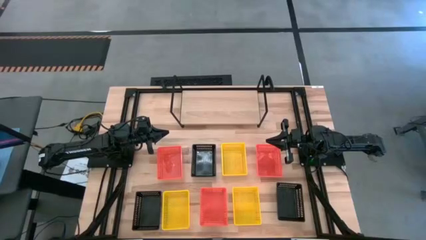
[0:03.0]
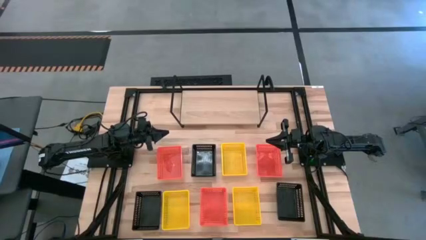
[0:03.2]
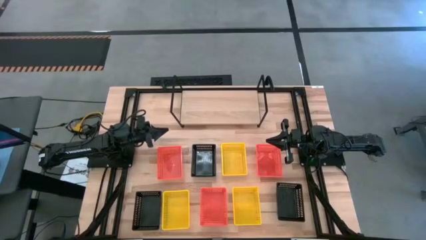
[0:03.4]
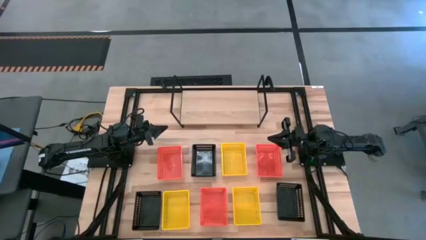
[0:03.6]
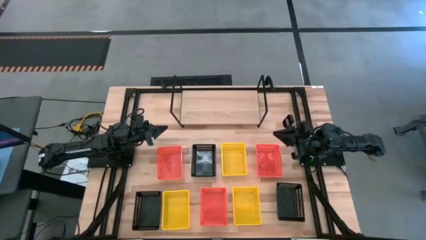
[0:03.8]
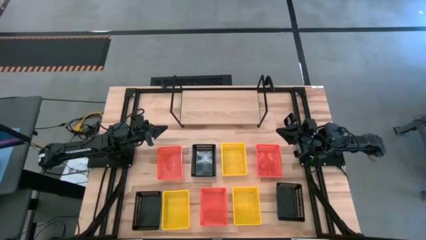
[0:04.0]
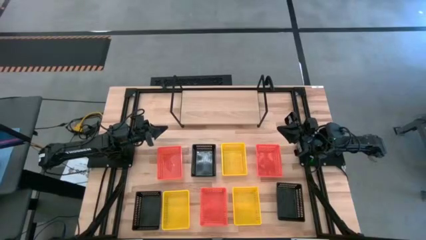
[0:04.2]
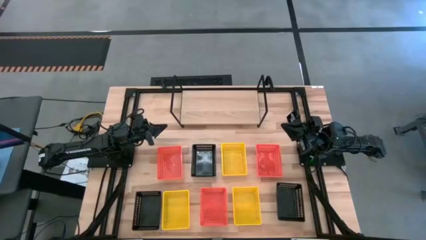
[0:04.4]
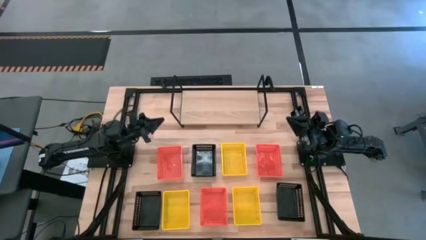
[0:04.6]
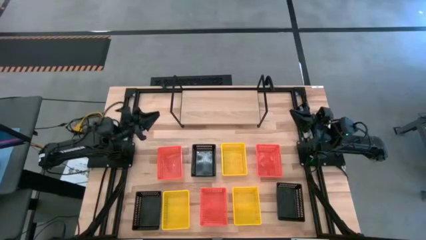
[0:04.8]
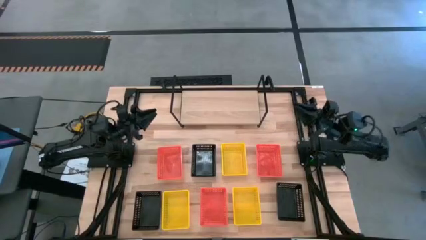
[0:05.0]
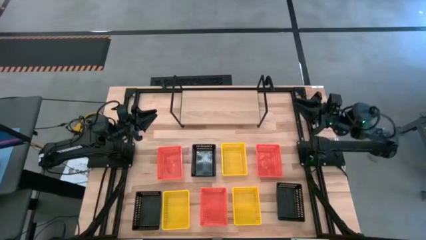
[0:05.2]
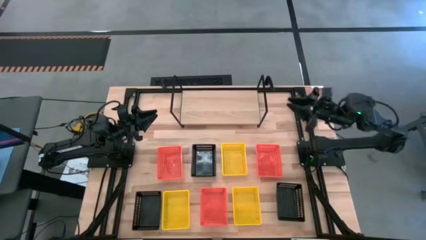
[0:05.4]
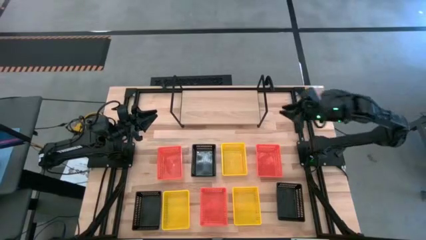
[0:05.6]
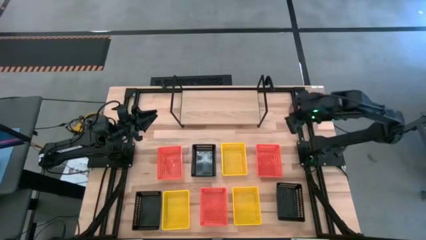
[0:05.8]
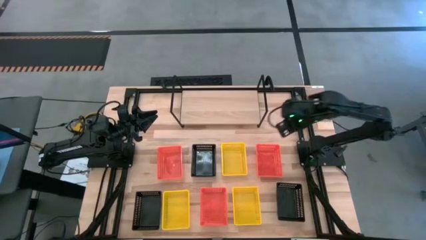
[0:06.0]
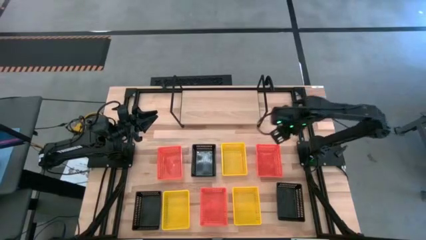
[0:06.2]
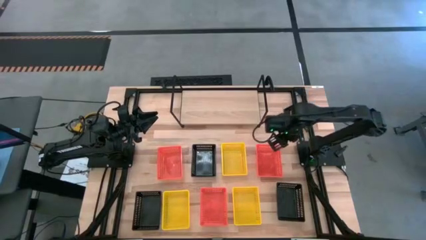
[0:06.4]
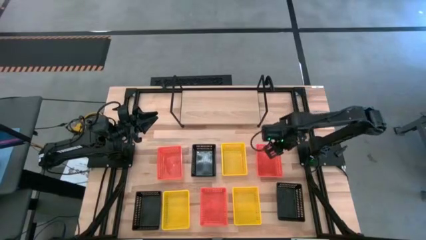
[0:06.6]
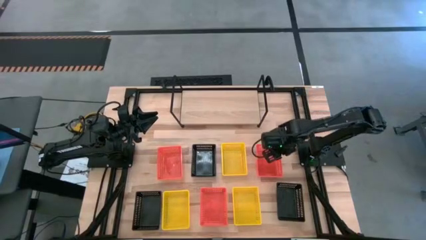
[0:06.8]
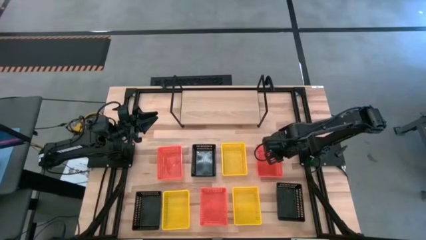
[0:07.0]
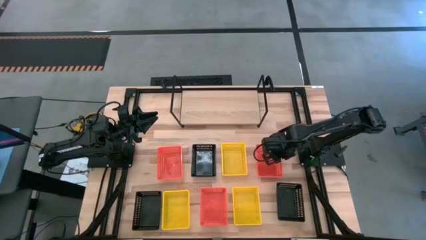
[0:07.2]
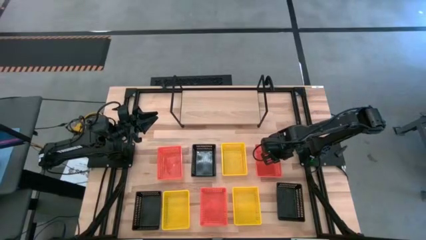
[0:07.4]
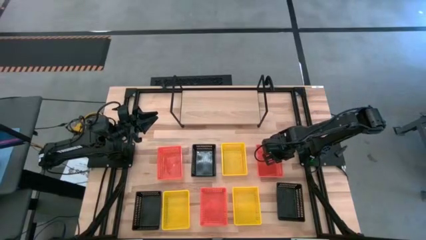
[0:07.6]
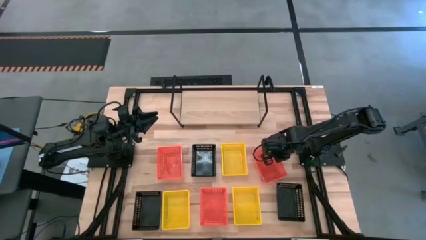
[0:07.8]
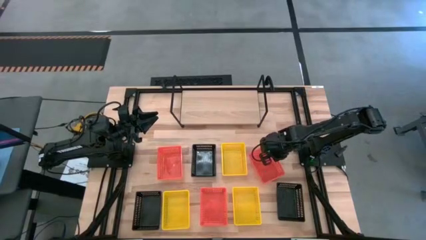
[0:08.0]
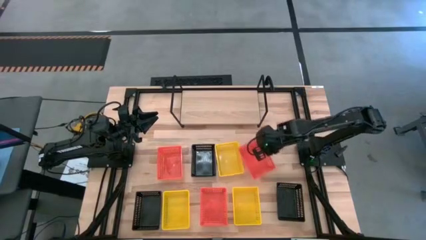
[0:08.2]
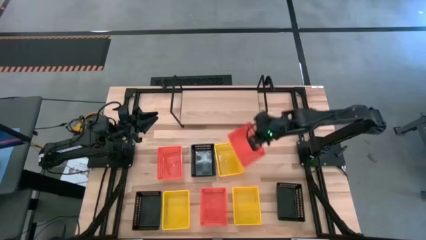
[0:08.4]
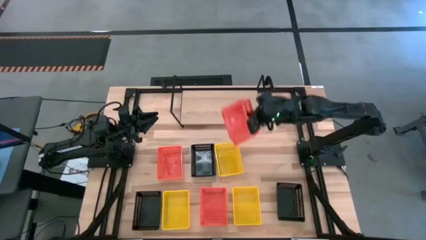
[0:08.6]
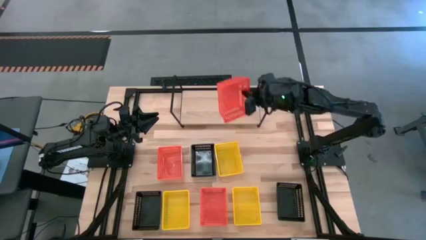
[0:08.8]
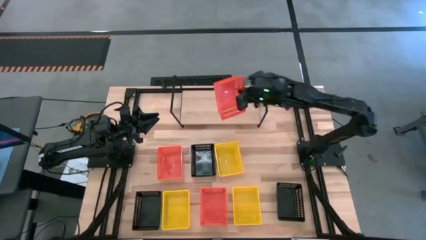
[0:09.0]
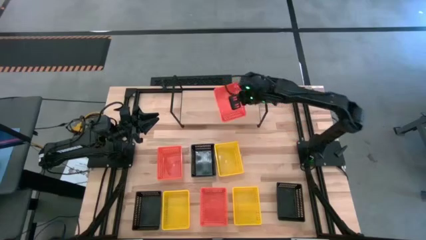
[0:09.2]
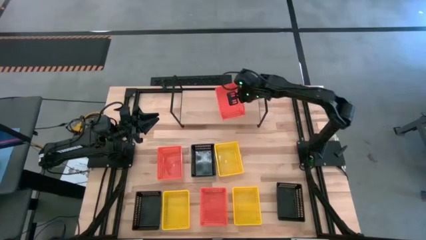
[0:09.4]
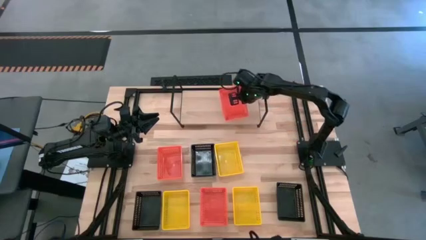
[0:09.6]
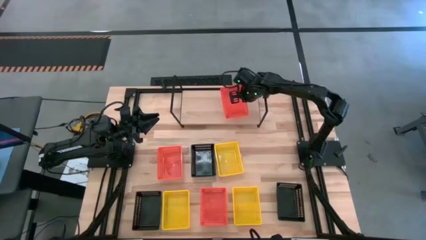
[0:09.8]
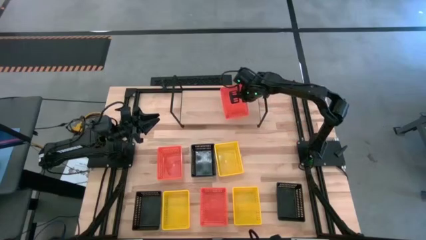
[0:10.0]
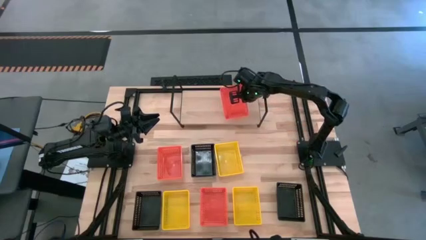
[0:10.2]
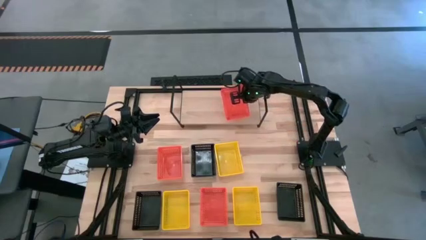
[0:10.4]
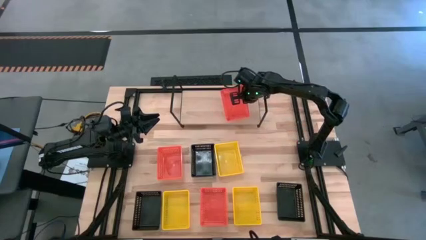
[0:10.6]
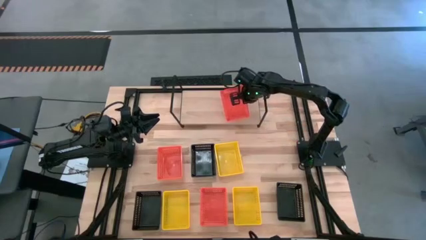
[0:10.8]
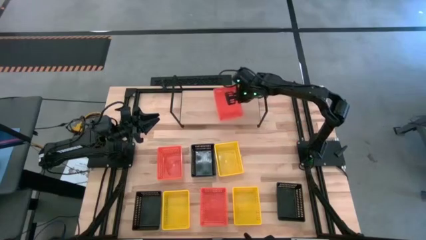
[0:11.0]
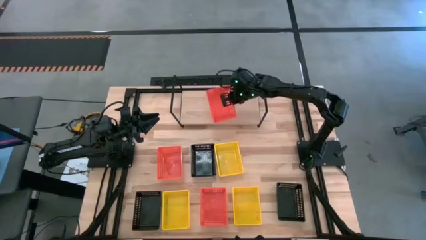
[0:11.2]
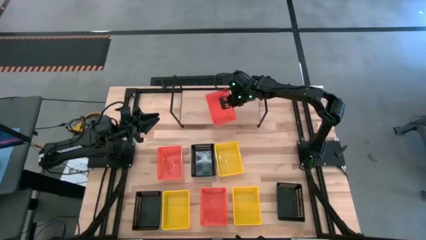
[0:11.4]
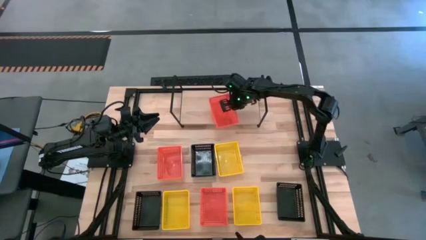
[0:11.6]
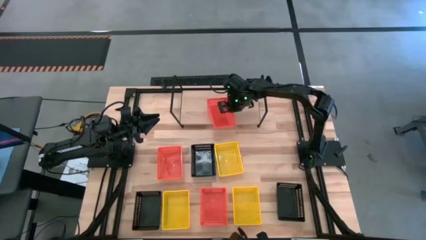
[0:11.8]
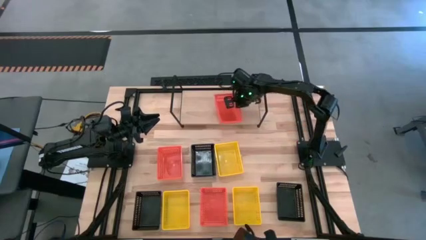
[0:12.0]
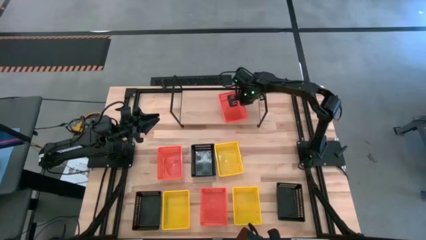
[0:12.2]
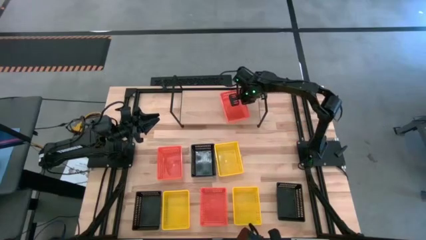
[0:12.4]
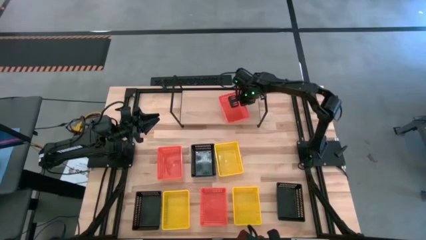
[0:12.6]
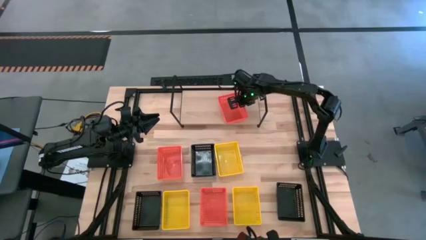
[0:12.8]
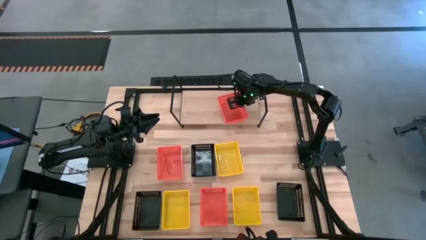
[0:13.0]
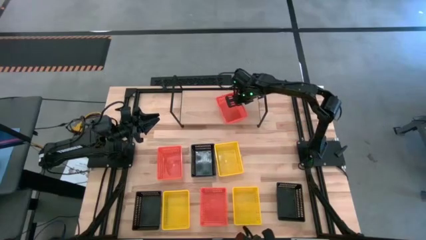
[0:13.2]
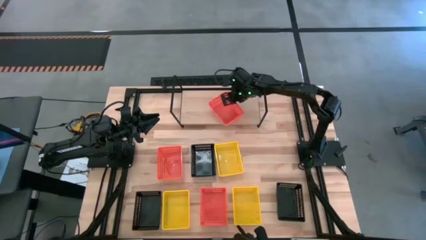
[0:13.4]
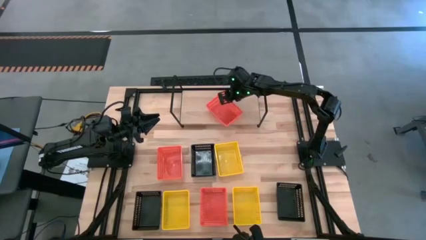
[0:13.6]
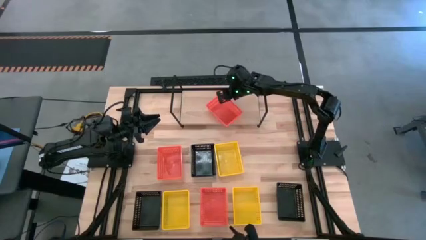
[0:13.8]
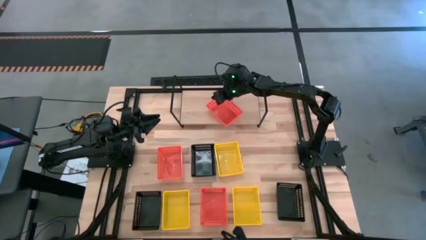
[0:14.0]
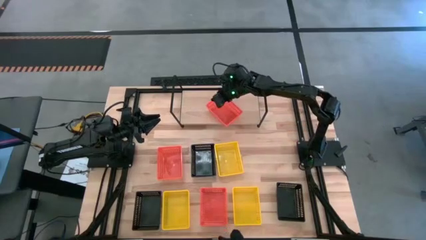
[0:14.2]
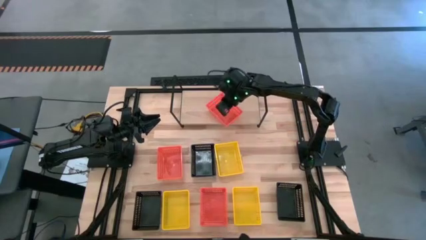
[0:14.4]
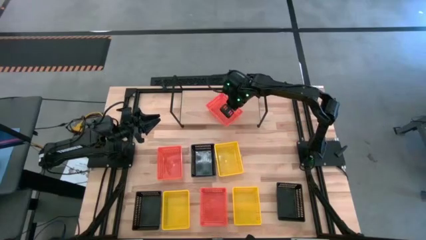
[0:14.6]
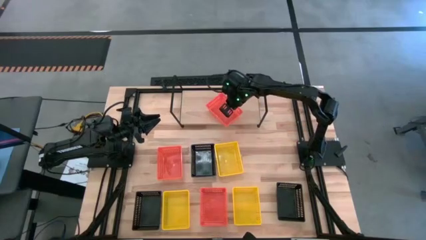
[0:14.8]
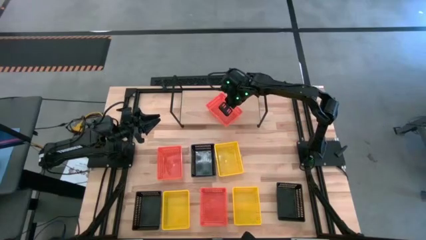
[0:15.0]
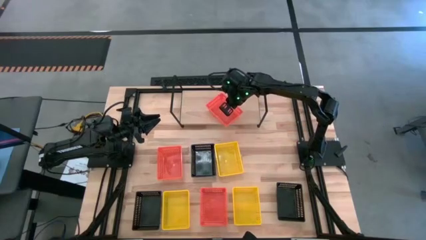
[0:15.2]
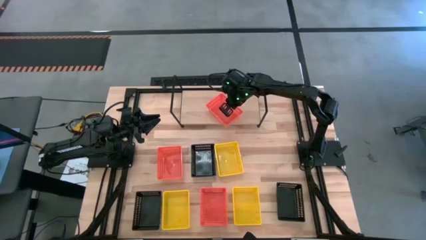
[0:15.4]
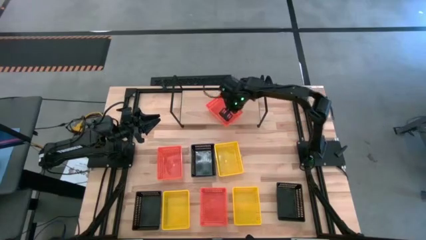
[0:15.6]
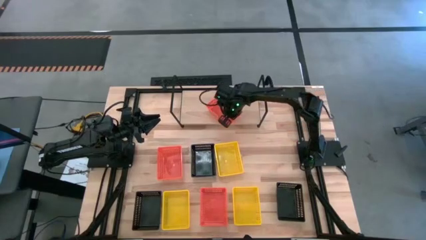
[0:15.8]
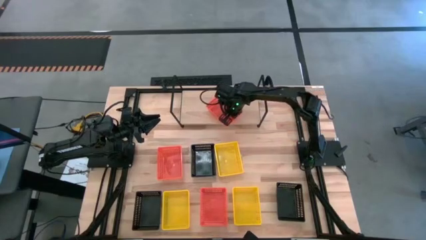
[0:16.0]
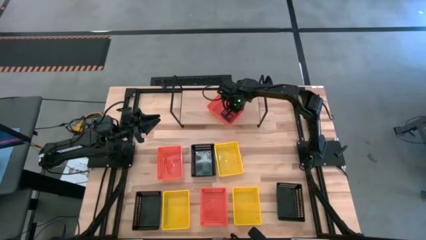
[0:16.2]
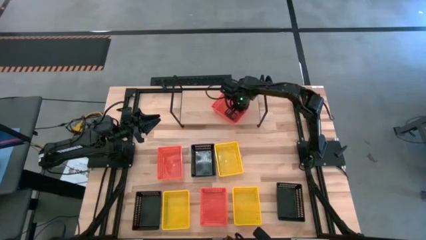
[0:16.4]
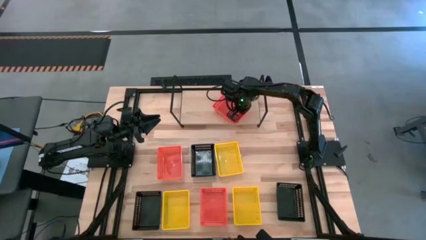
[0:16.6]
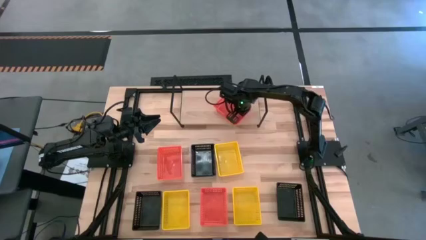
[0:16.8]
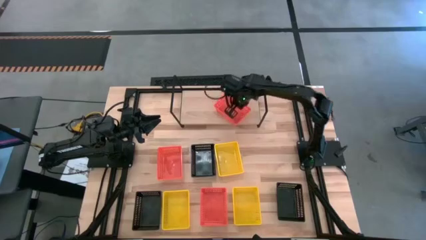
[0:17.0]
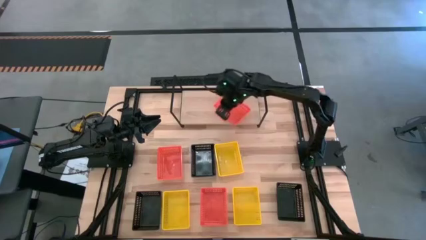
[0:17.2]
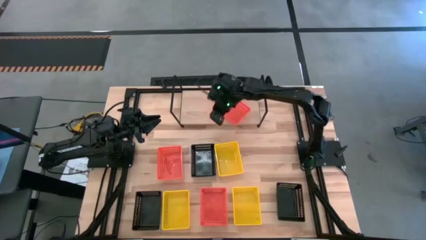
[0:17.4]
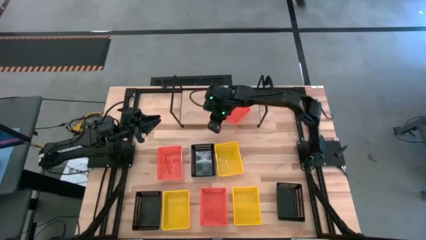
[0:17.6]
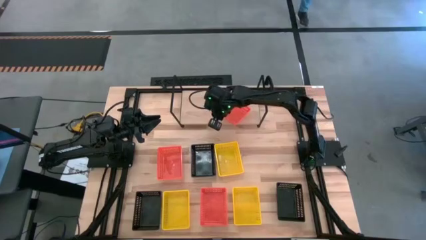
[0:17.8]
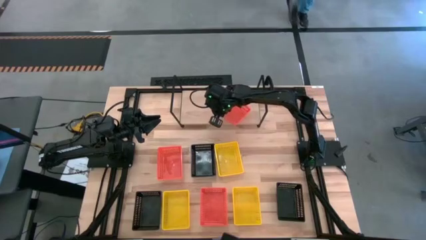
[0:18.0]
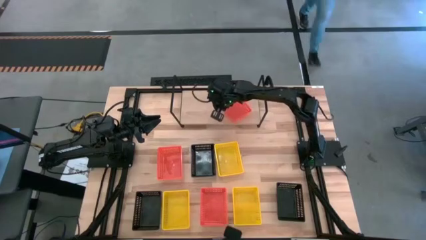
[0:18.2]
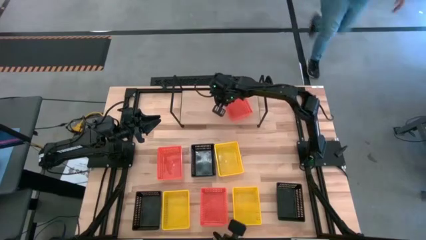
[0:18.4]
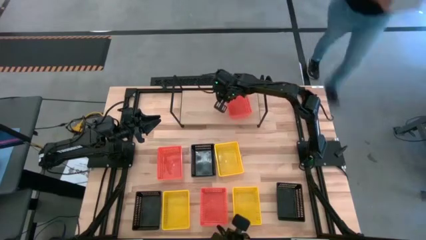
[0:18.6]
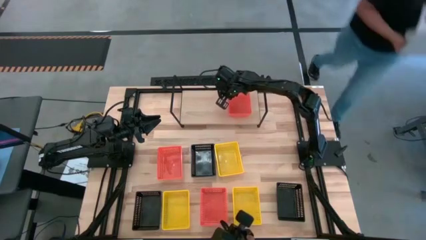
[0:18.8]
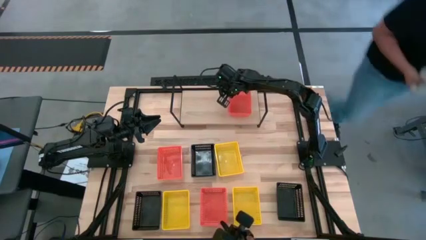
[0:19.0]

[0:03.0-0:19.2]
Task: Stack baskets on shelf by color
Put the top right orange bin on the shelf
